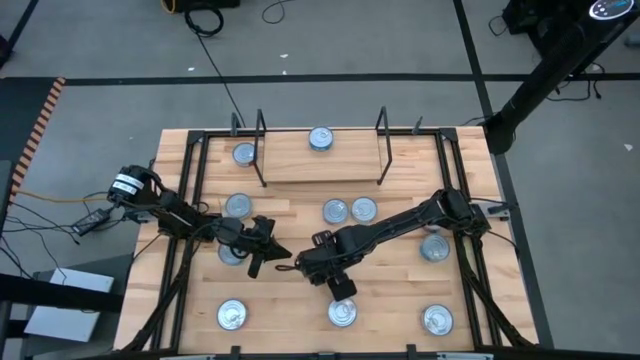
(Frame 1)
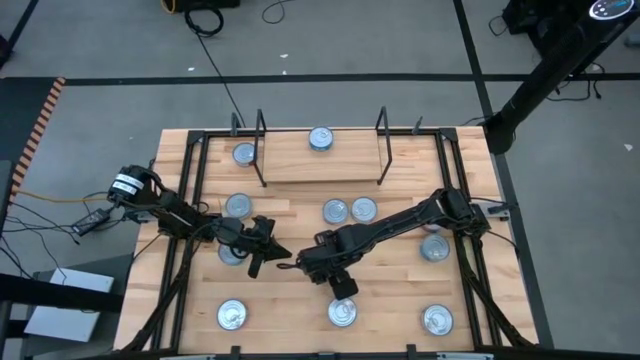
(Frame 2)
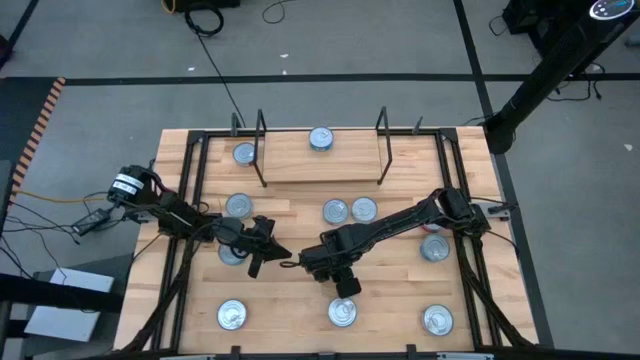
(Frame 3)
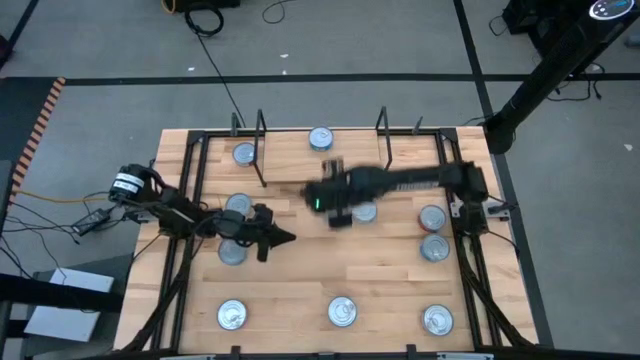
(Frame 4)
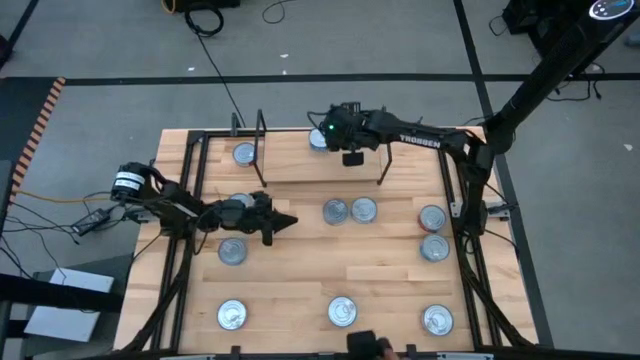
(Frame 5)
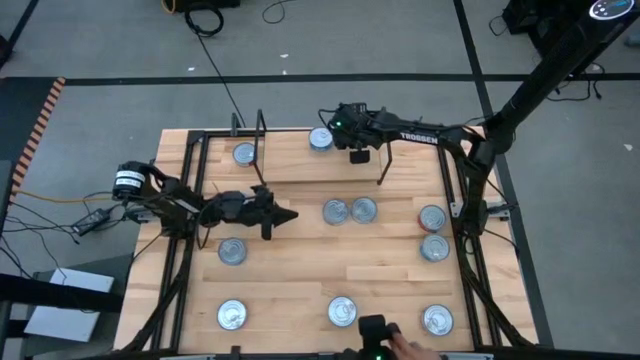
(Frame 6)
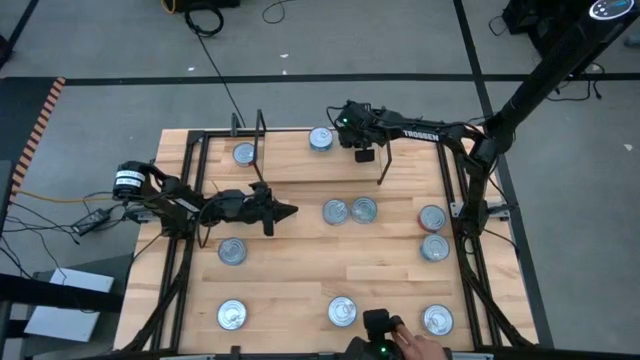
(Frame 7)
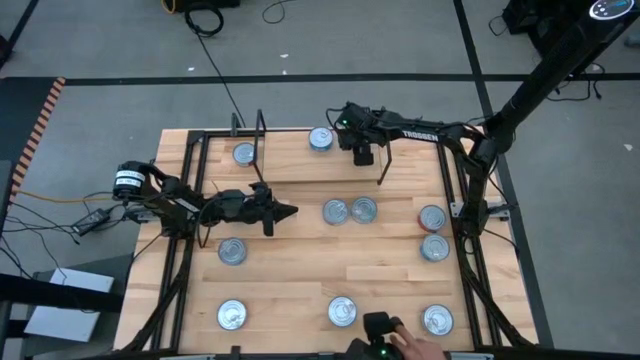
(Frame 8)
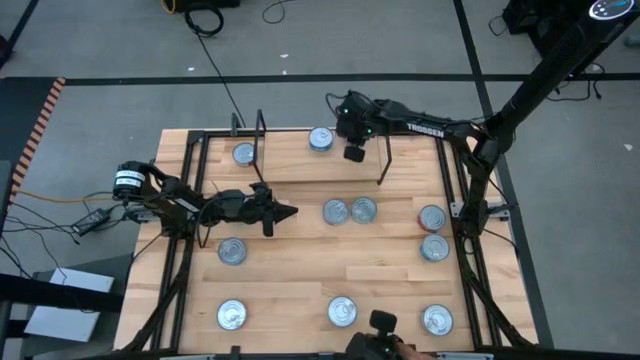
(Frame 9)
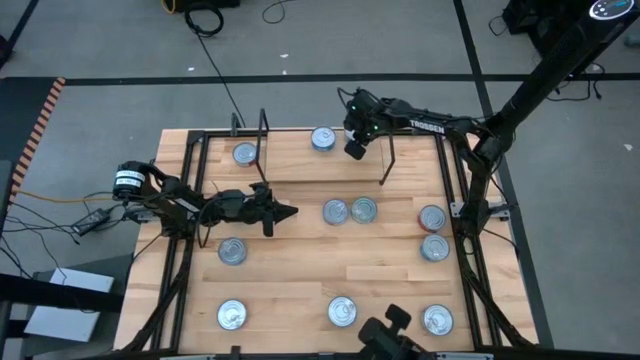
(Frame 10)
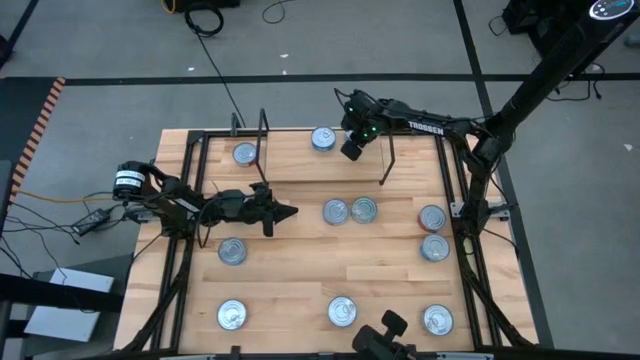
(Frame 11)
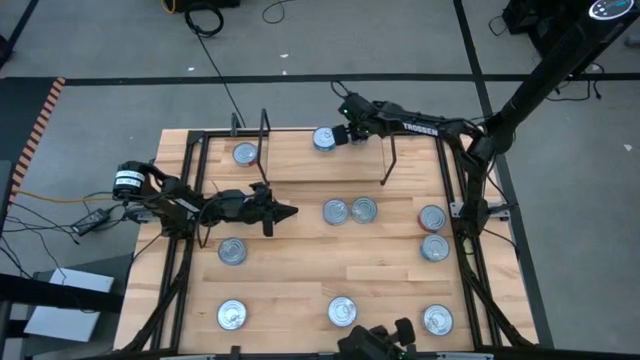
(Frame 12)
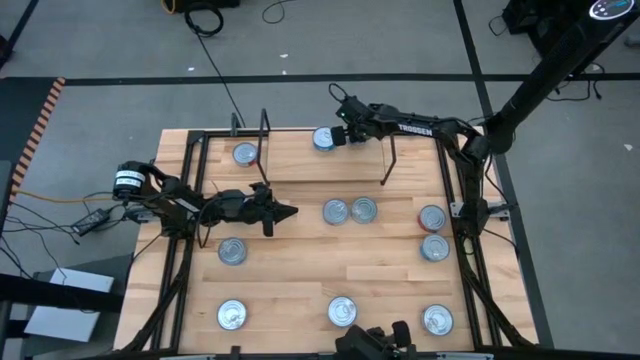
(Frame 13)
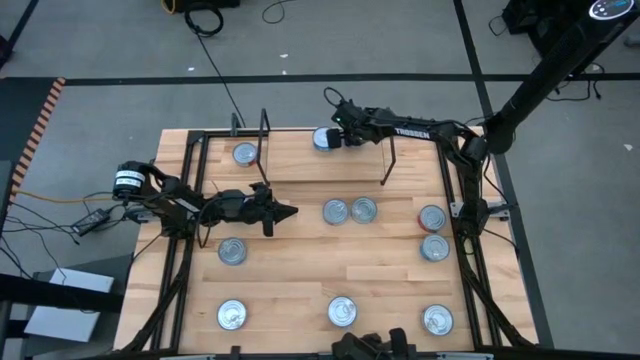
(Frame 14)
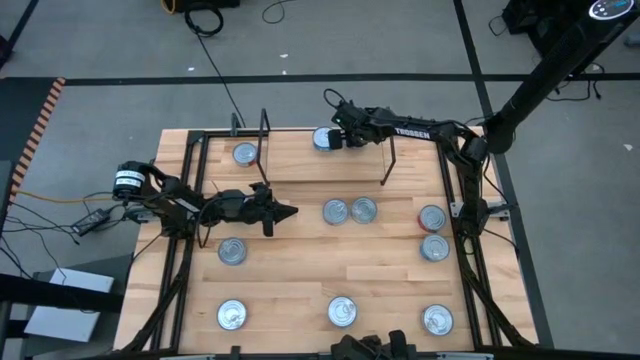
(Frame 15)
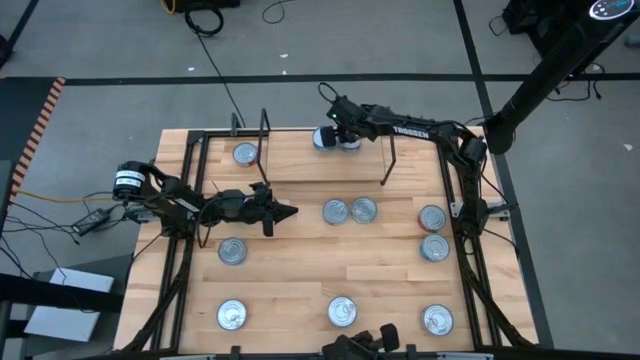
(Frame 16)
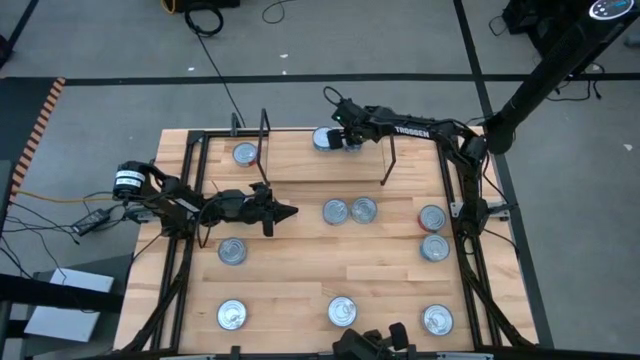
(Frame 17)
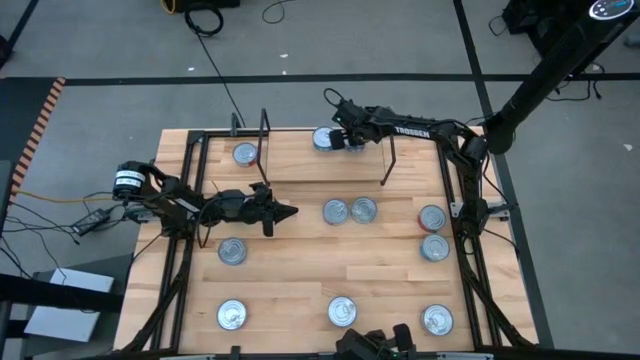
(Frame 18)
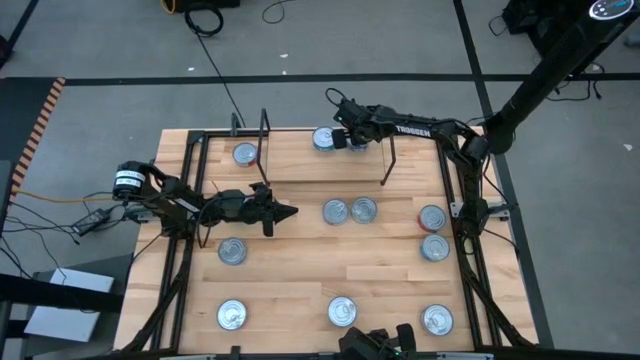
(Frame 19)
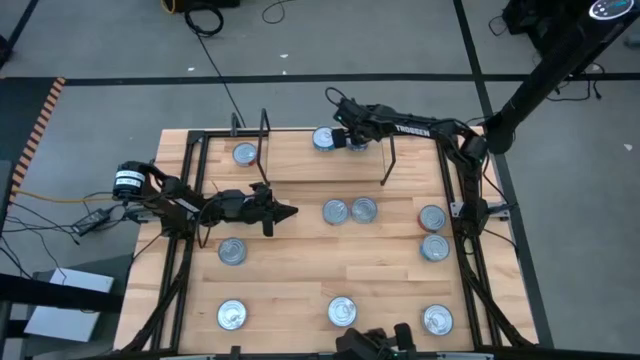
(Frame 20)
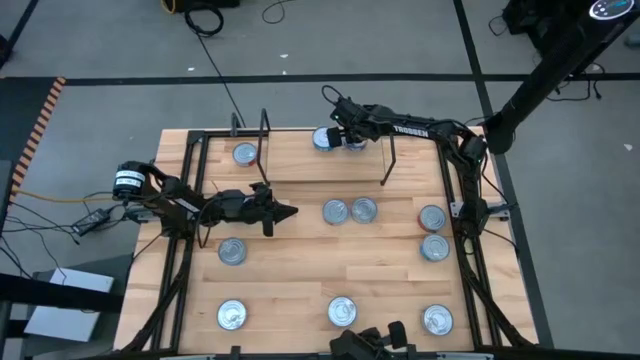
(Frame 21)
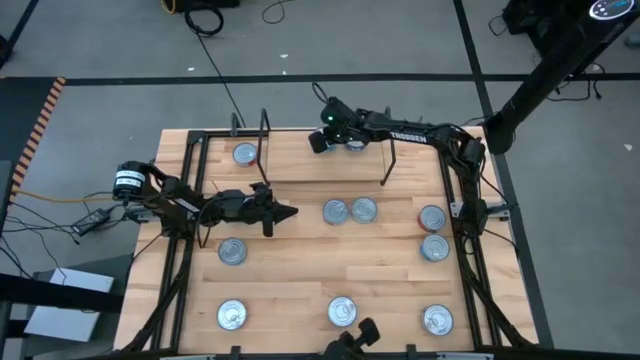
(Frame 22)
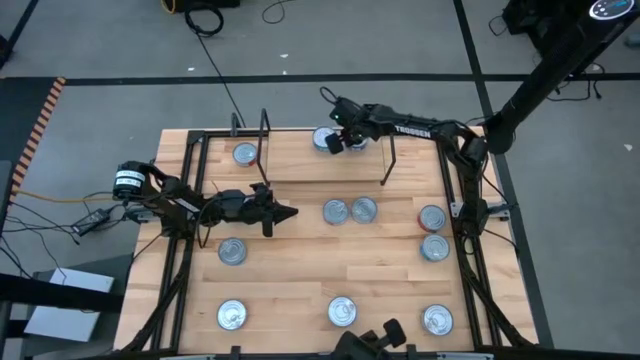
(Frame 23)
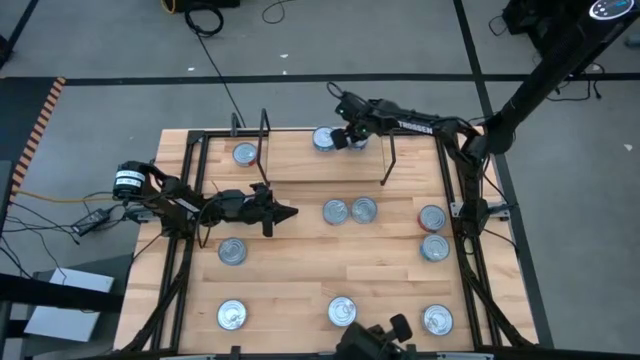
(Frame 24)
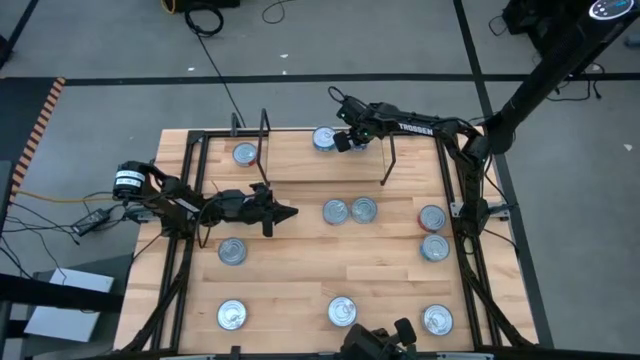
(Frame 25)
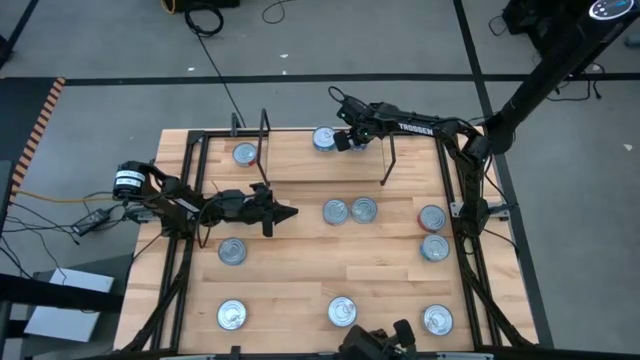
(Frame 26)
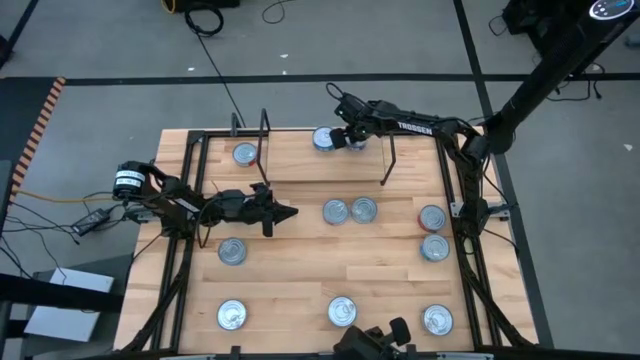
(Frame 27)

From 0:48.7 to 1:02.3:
Task: Stack canned seafood by type on shelf
Adjust the shelf

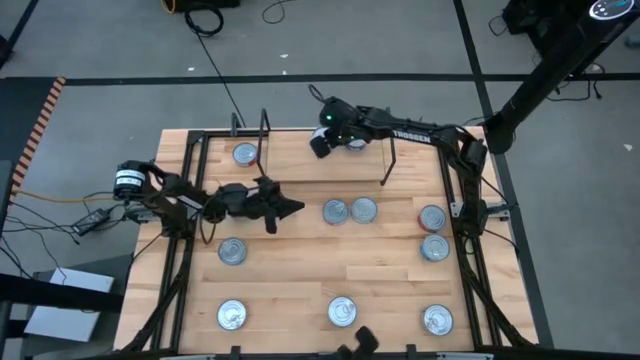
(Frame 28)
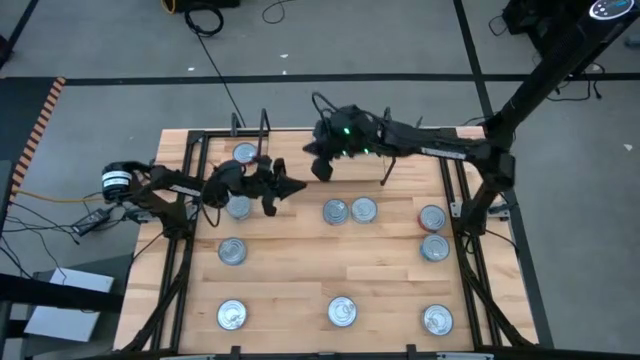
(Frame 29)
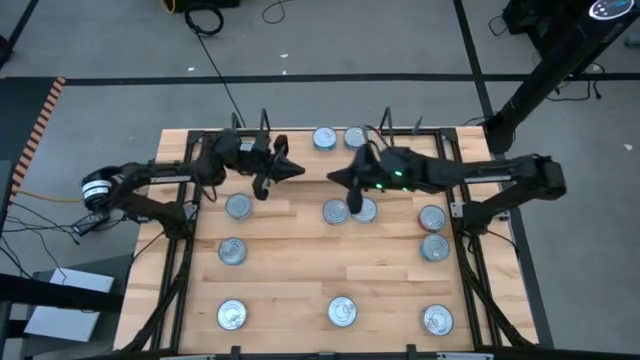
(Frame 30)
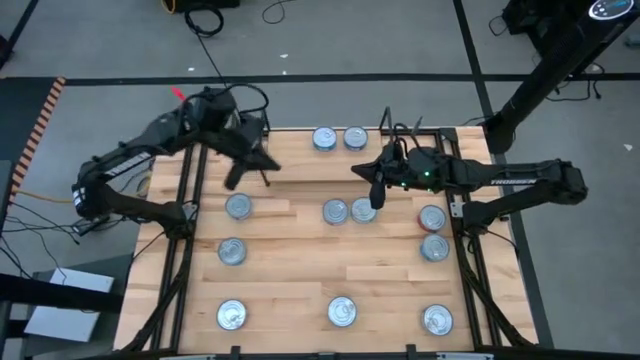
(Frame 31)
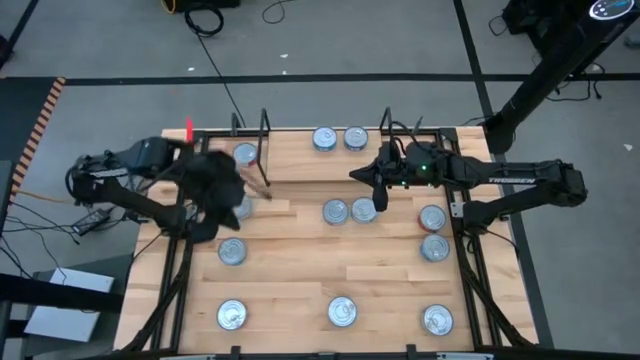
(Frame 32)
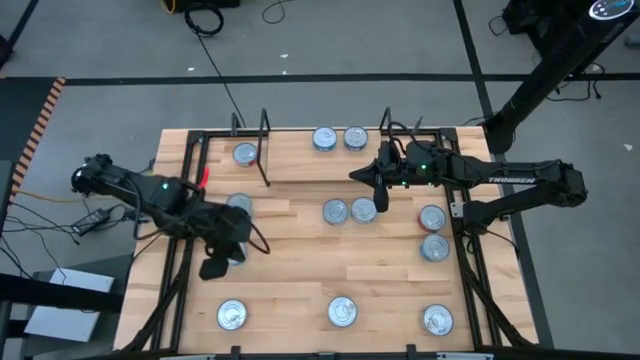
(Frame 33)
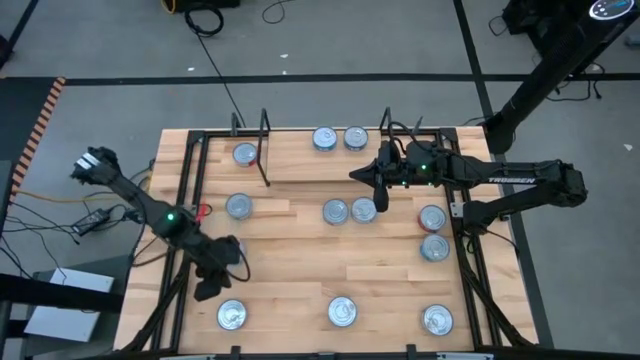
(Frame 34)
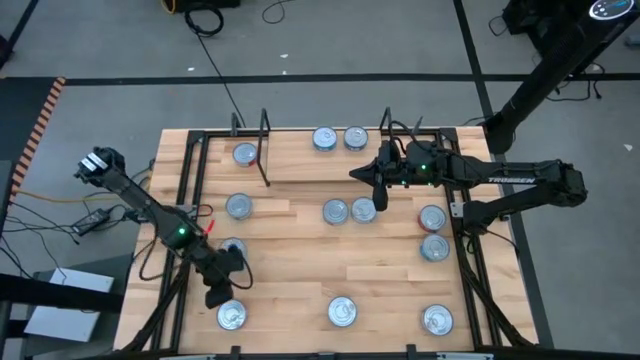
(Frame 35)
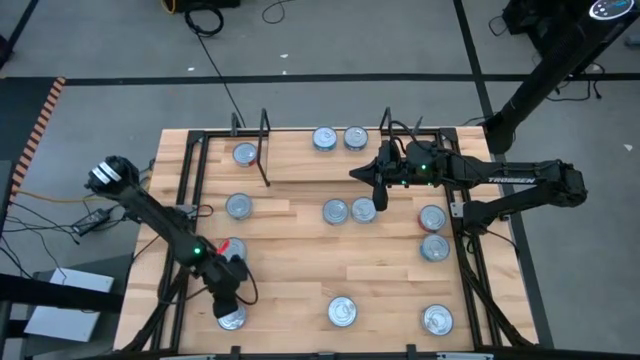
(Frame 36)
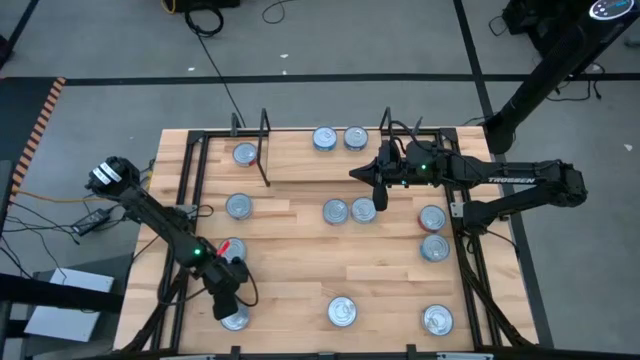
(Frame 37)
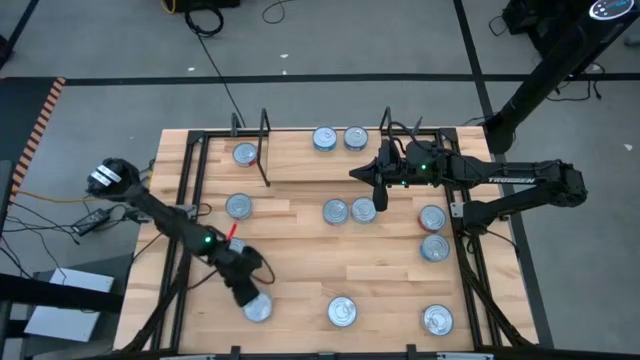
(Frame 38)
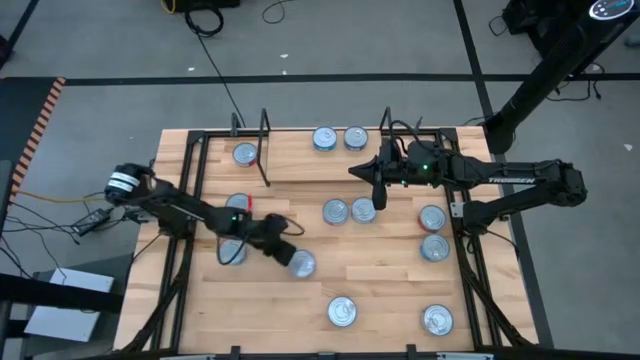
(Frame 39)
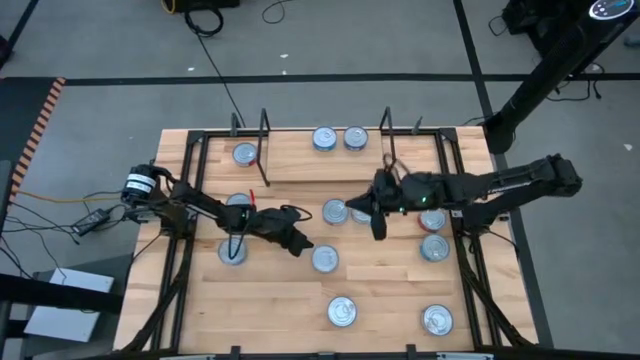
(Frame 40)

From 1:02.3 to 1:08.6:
Put the red tuna can on the shelf

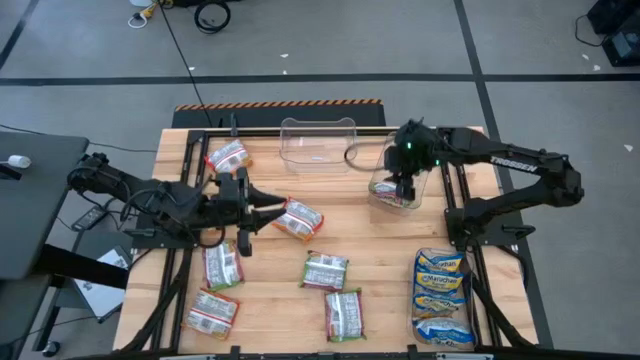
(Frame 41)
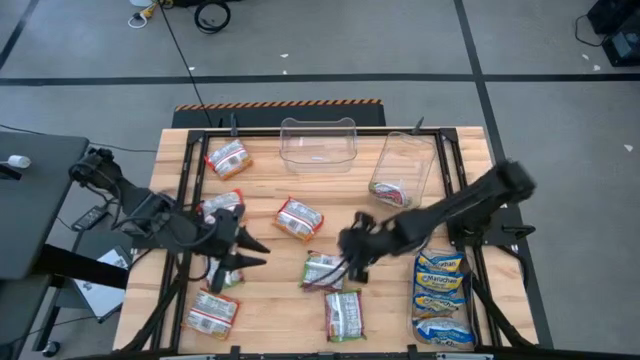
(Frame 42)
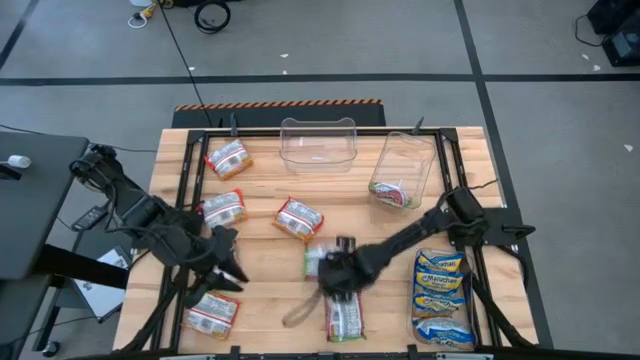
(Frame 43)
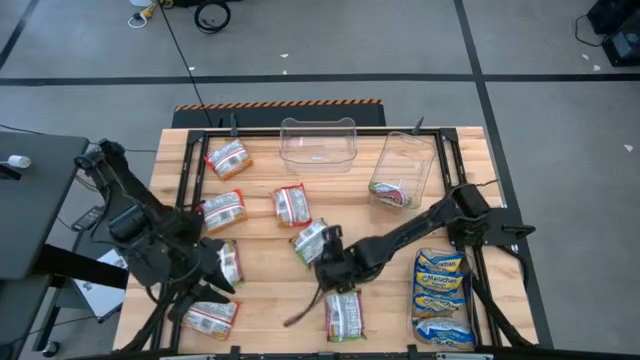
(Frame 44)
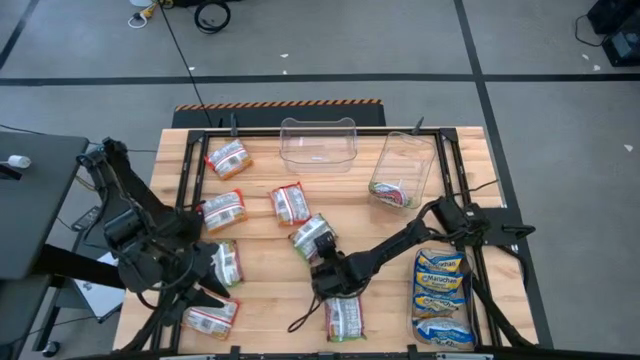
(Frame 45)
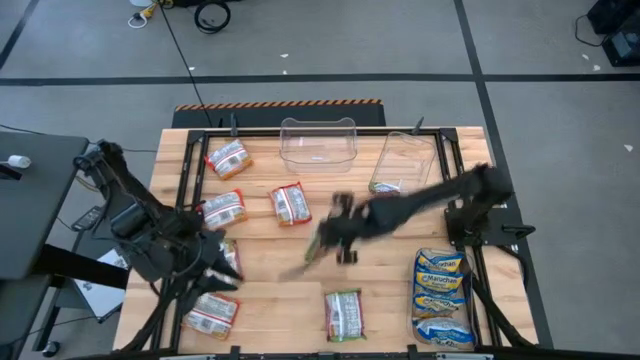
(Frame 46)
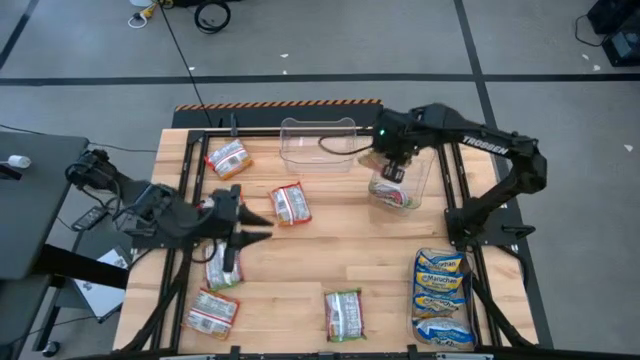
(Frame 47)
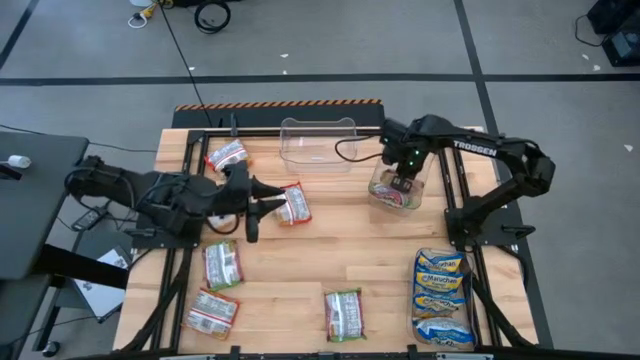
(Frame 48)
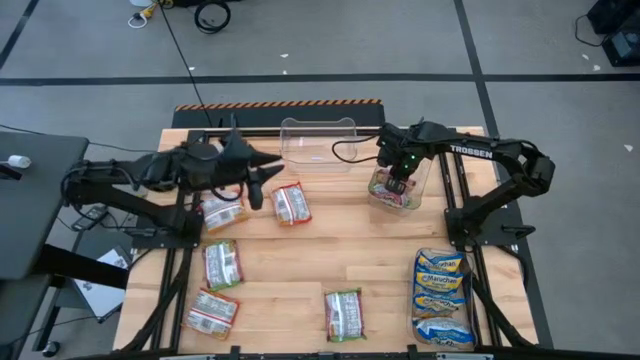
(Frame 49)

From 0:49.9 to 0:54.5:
Task: Sort Maruchan noodles
Put the middle red noodle pack into the top right transparent bin
